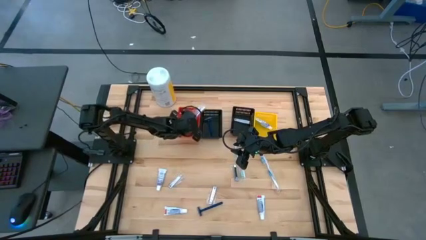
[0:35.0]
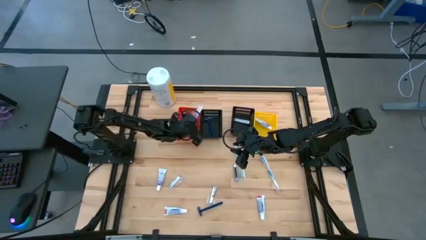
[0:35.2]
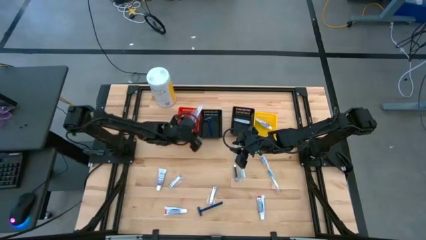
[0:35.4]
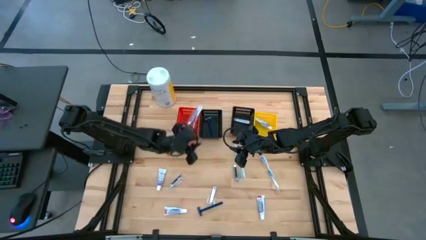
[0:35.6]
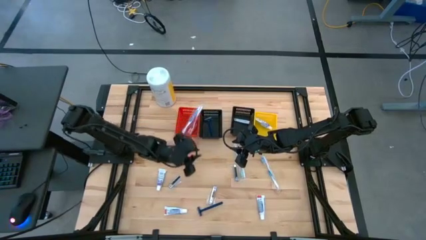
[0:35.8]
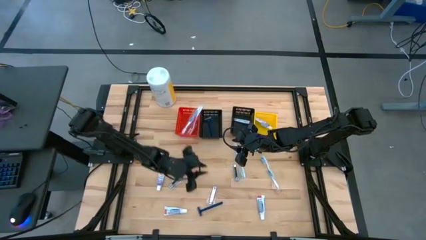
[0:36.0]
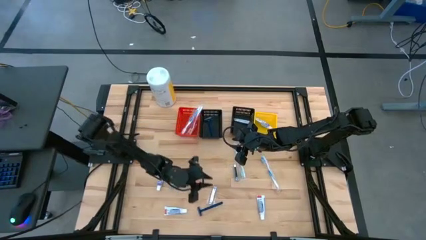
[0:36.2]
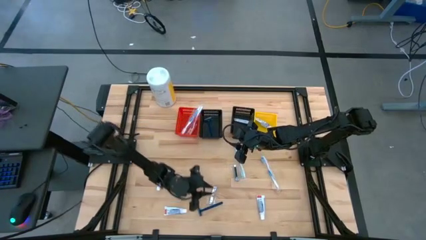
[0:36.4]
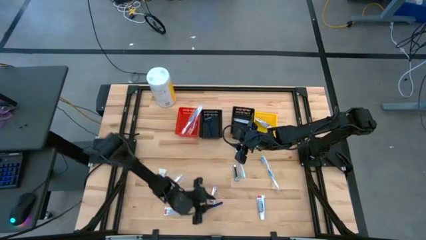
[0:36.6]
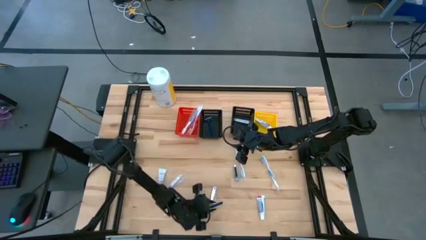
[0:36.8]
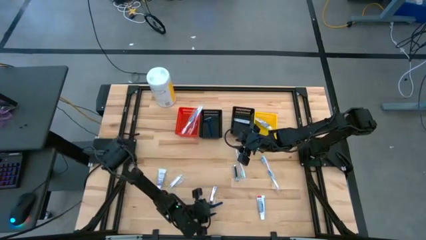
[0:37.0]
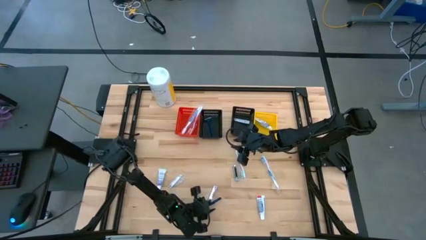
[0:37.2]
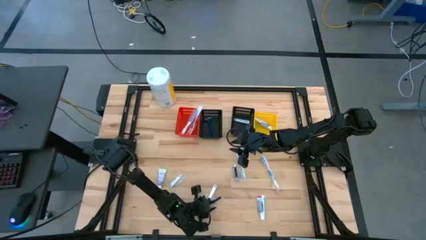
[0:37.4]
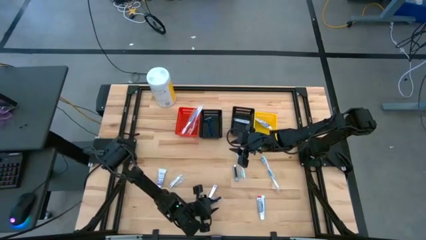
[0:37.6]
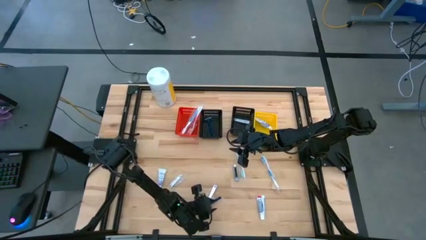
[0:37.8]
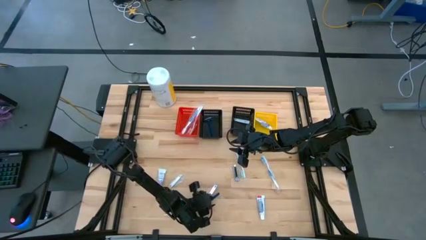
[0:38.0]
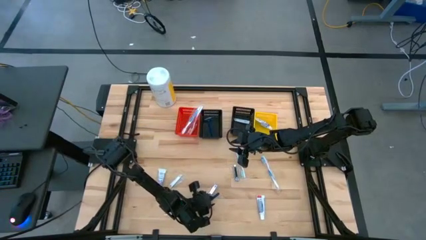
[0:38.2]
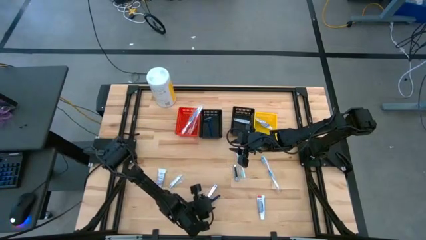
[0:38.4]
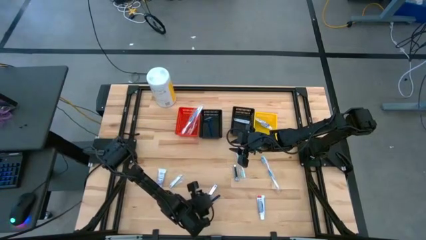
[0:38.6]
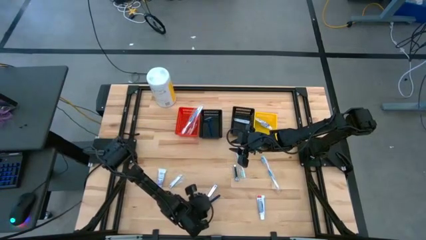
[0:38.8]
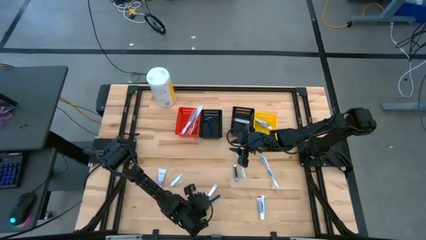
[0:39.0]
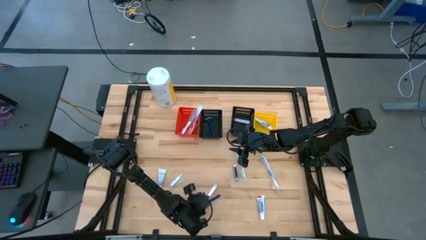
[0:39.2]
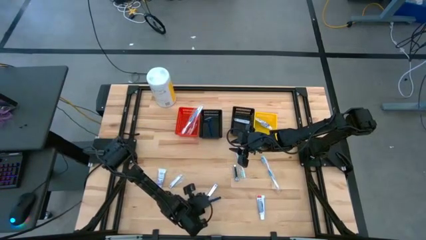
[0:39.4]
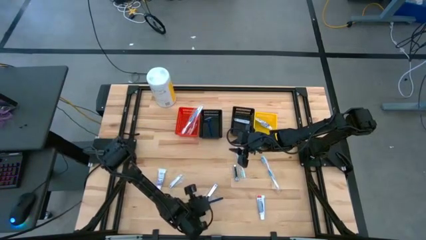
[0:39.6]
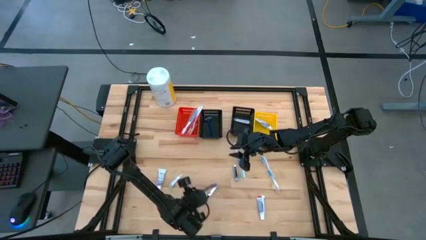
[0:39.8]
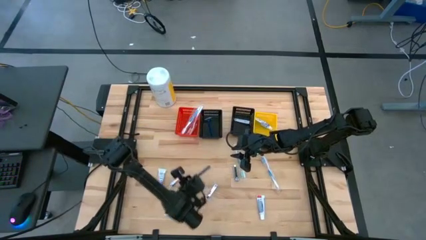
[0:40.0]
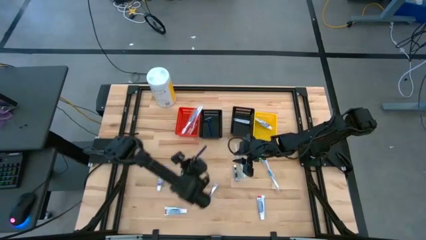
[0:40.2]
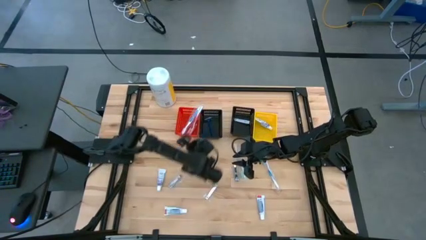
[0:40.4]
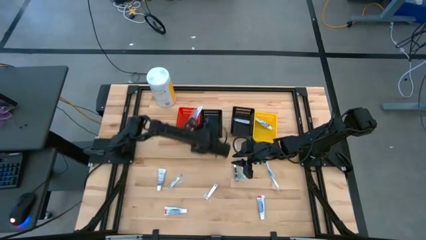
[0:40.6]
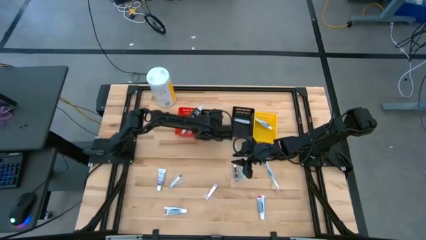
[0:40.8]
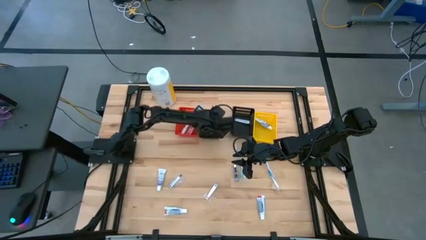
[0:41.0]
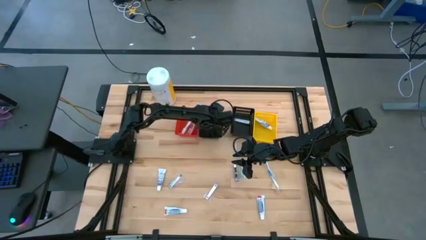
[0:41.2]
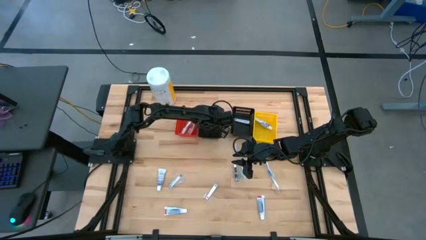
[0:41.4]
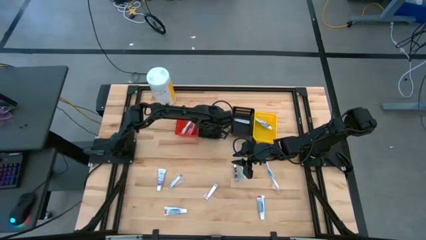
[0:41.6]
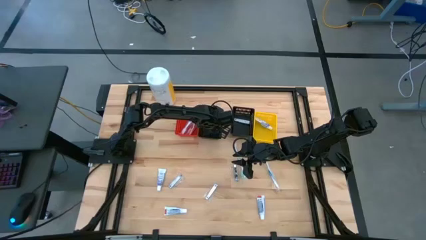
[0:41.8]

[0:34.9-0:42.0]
Task: Pick & Place Travel size toiletries
Put the blue razor into the left black basket

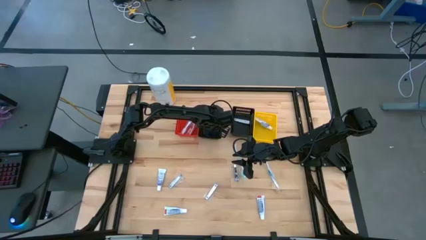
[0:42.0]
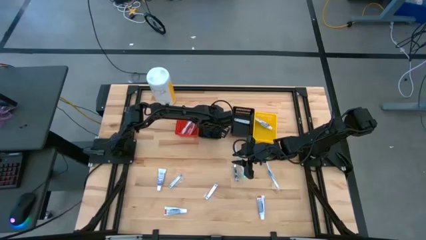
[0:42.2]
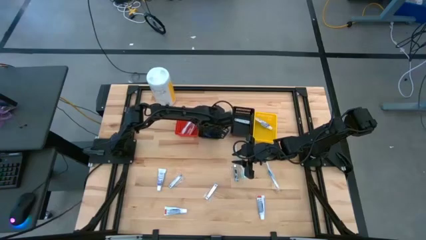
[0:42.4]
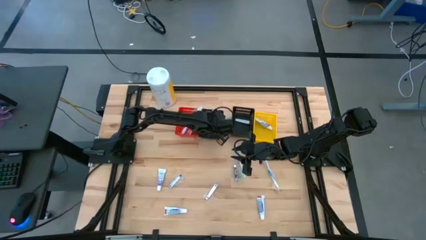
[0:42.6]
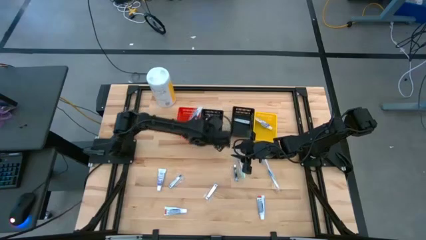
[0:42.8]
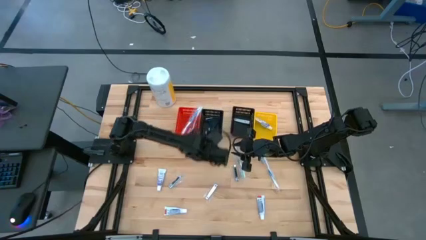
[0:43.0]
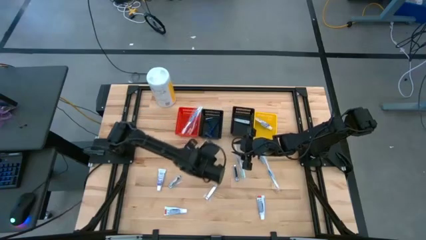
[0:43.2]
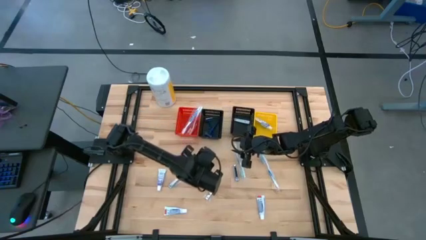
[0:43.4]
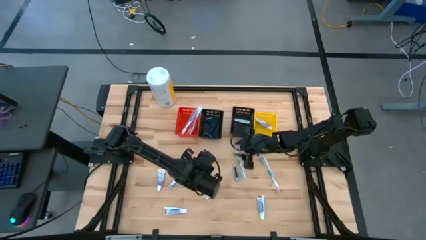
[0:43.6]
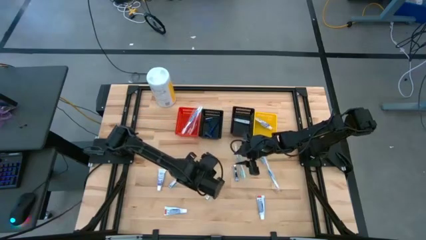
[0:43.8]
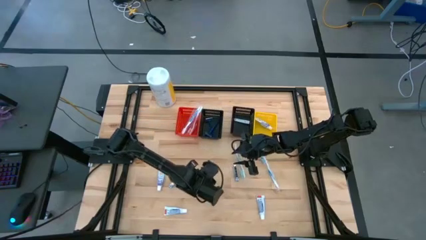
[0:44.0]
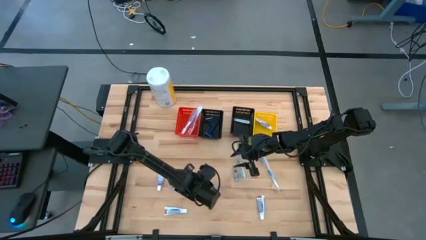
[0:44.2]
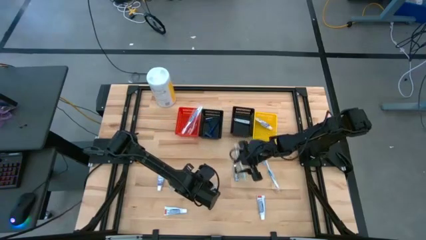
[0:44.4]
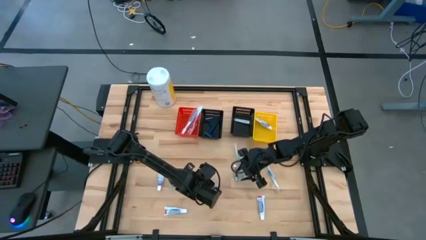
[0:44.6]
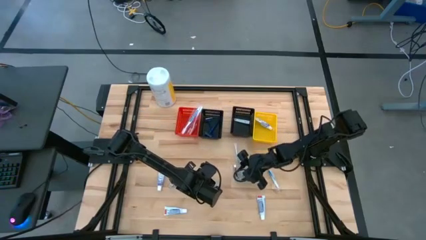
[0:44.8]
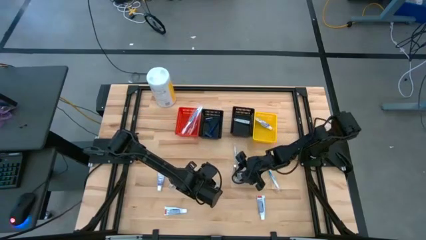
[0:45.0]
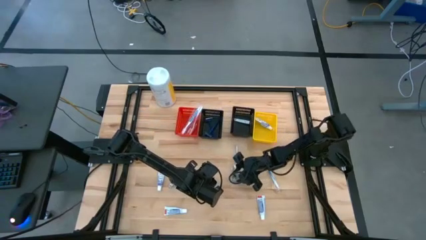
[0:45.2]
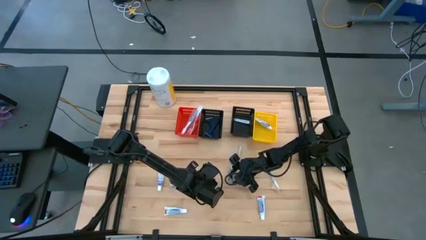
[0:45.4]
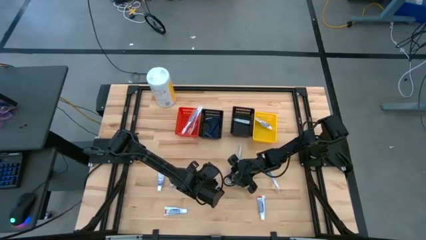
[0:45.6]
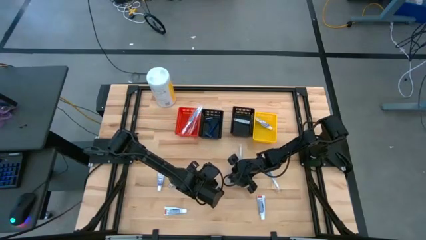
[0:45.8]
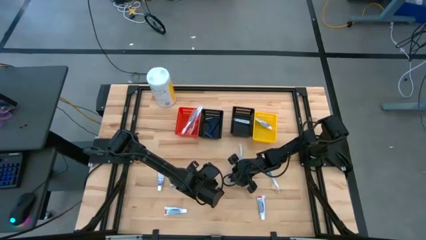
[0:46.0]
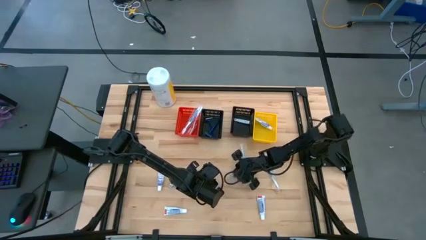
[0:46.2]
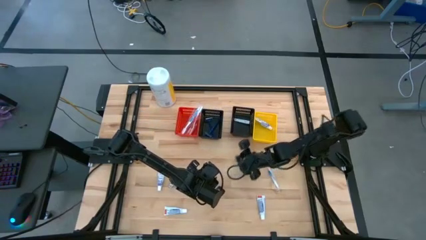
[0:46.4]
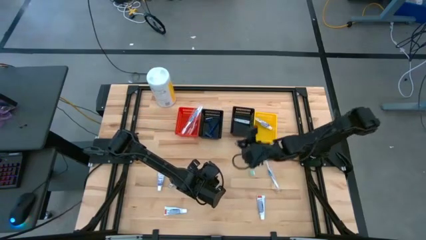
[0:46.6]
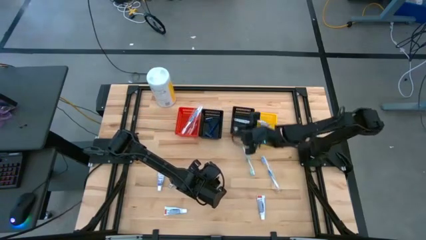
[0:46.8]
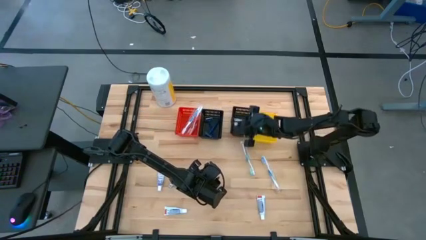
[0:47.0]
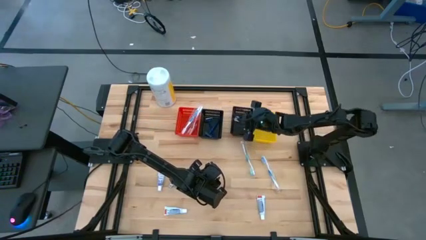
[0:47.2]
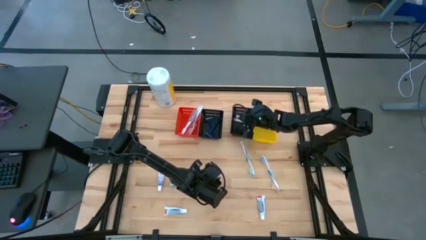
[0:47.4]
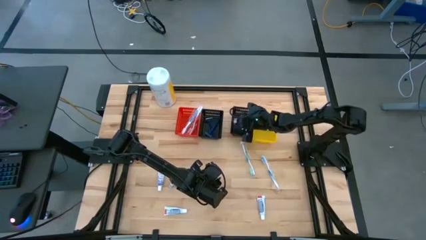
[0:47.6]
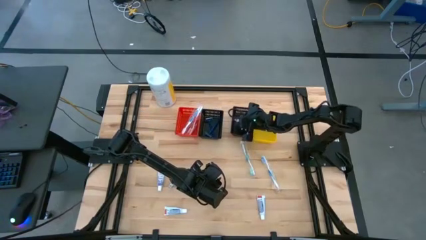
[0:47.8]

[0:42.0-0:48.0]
Put the silver nail cutter into the right black basket

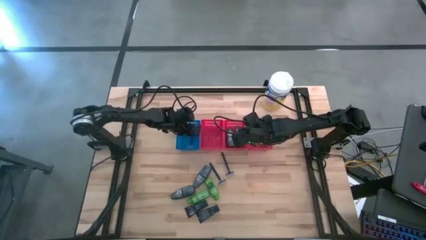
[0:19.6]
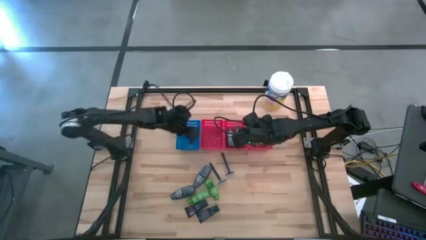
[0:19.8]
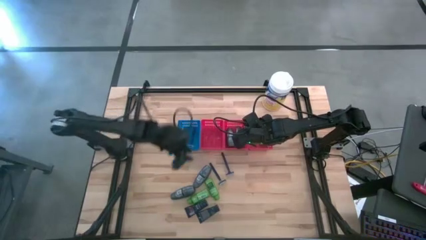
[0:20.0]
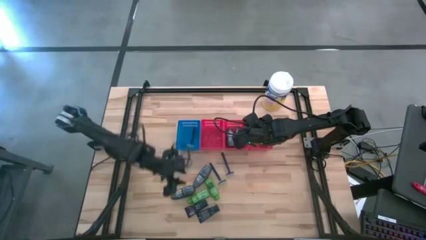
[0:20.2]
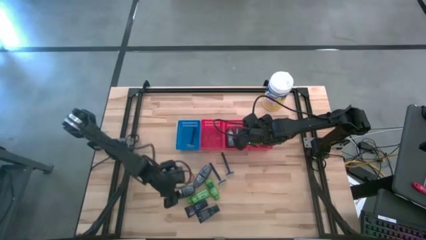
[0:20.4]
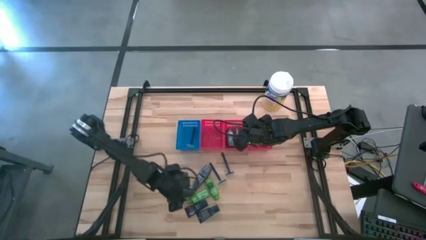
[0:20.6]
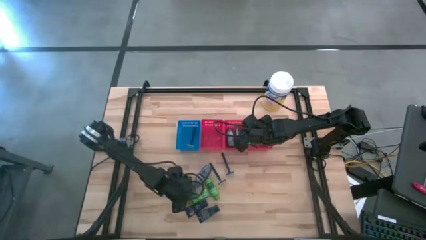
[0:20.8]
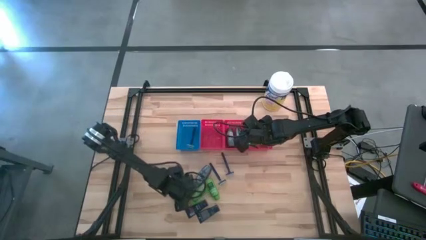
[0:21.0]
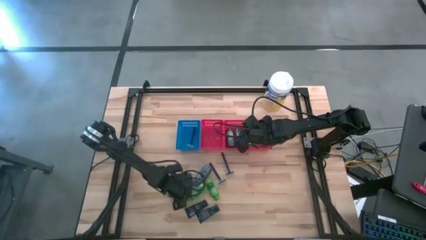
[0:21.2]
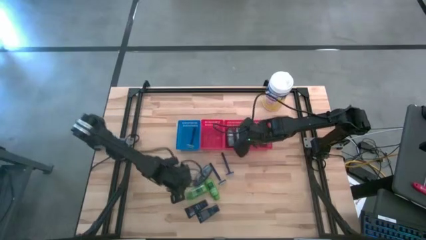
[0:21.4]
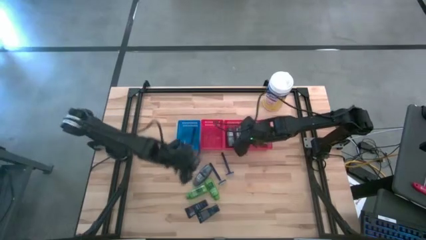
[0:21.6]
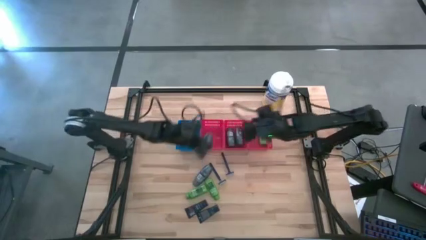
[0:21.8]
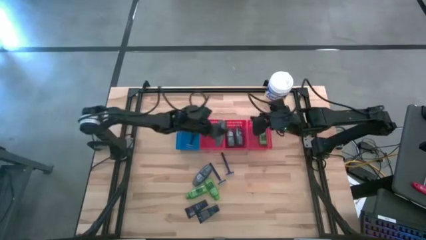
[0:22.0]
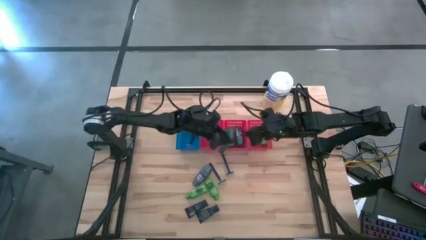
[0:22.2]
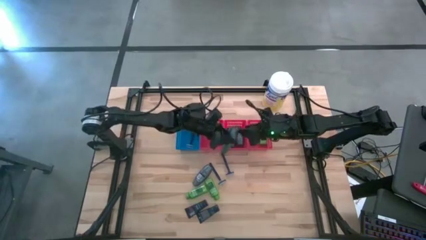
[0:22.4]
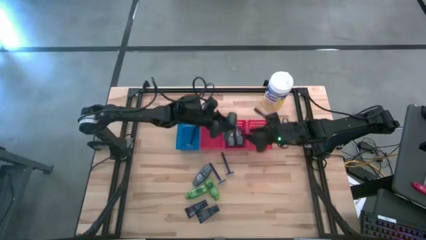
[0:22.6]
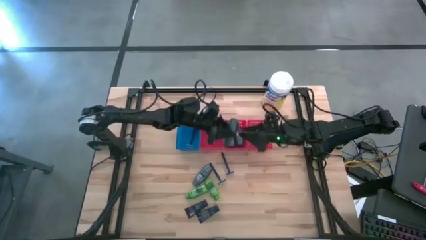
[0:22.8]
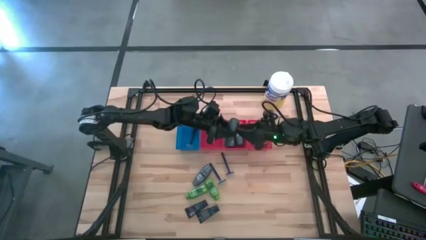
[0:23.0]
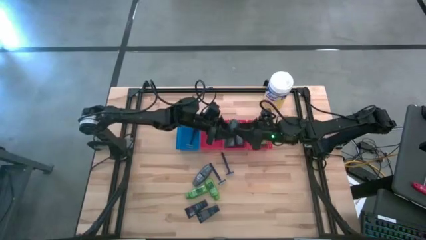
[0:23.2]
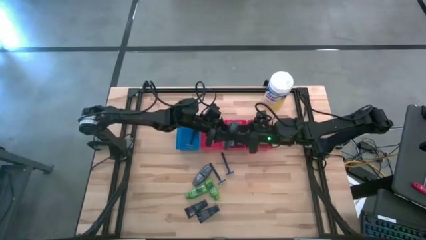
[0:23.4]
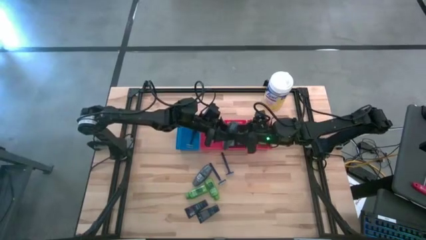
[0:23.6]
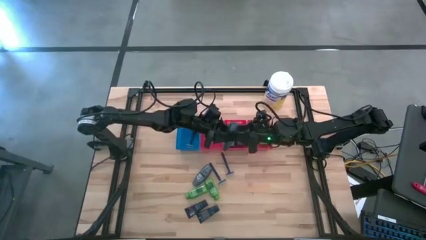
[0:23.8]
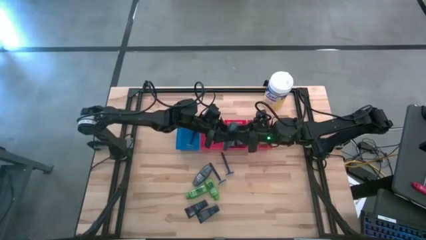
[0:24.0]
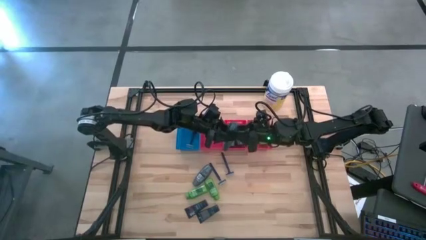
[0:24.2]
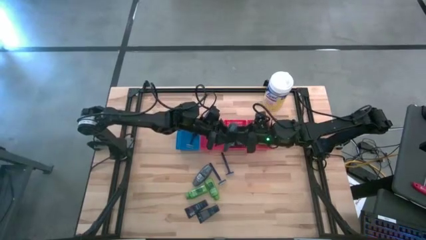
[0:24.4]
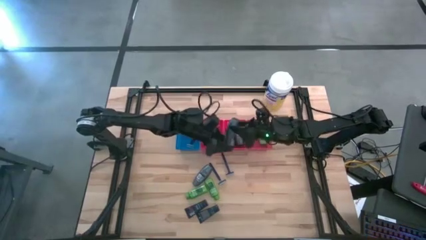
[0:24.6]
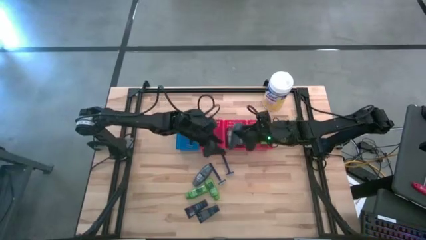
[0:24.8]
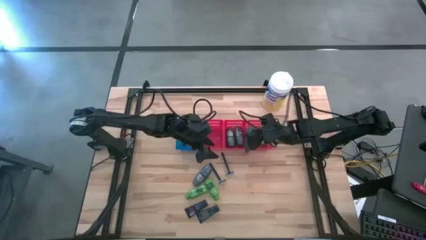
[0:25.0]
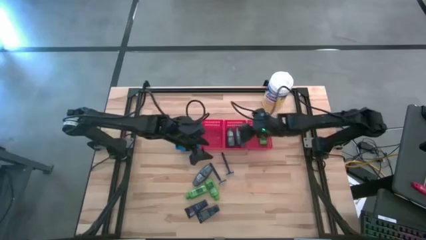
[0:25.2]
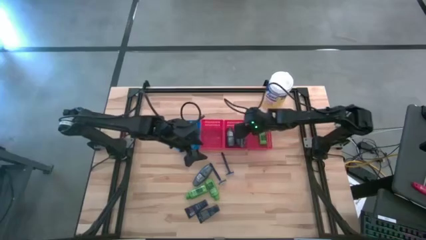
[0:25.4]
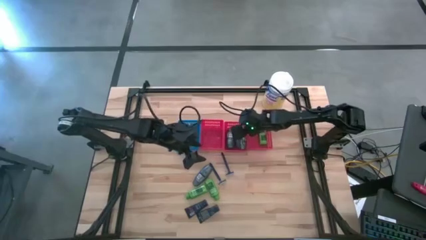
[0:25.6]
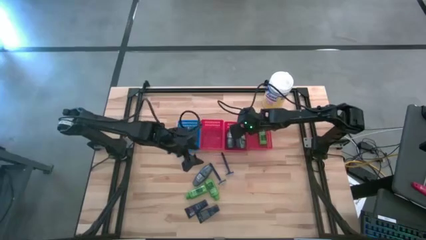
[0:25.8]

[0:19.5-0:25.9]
Task: Pick & Place Travel size toiletries
Put the gray deodorant into the middle red bin
